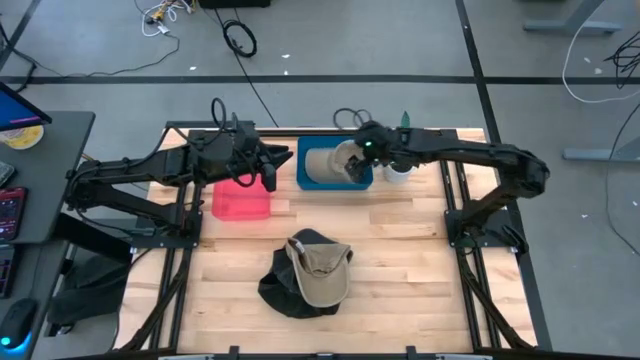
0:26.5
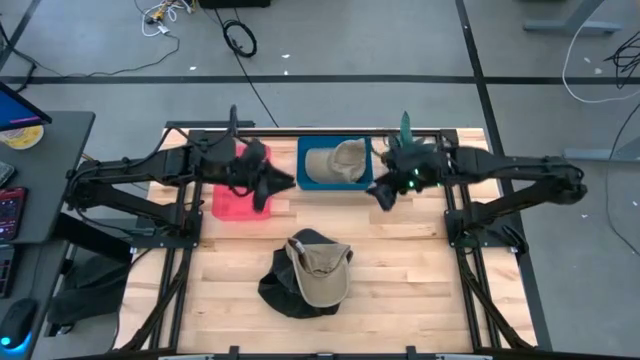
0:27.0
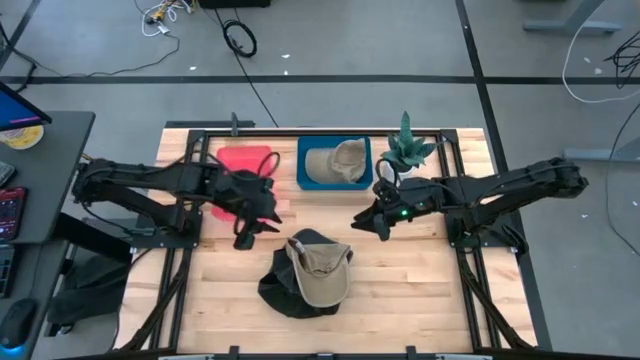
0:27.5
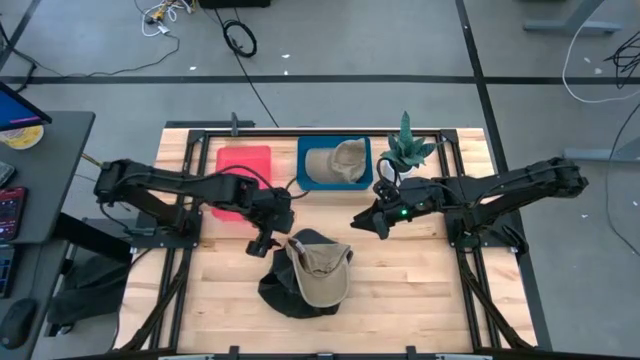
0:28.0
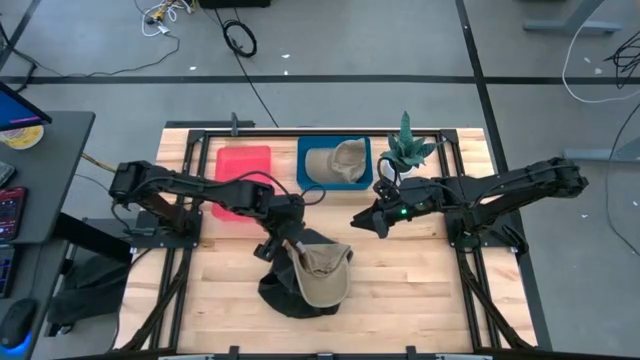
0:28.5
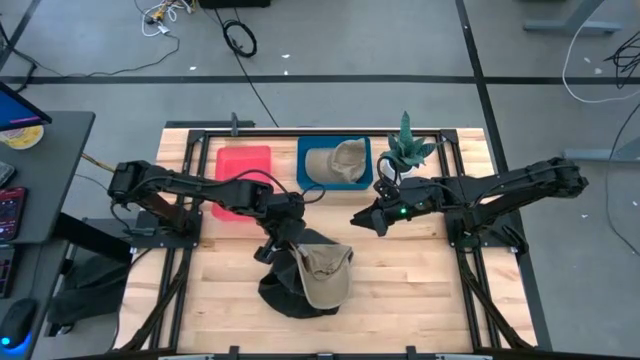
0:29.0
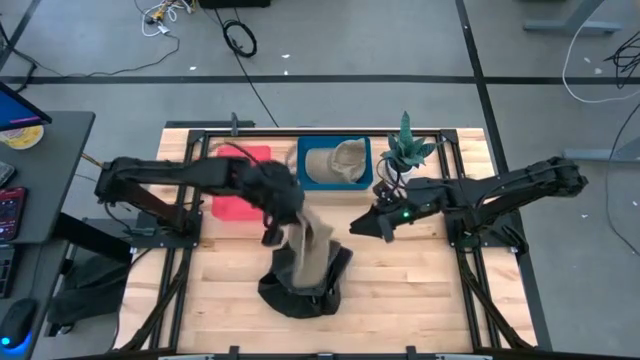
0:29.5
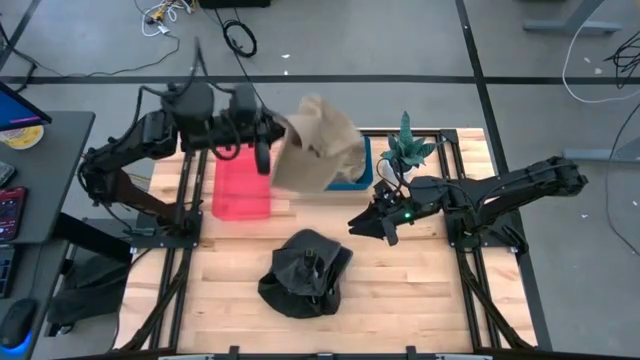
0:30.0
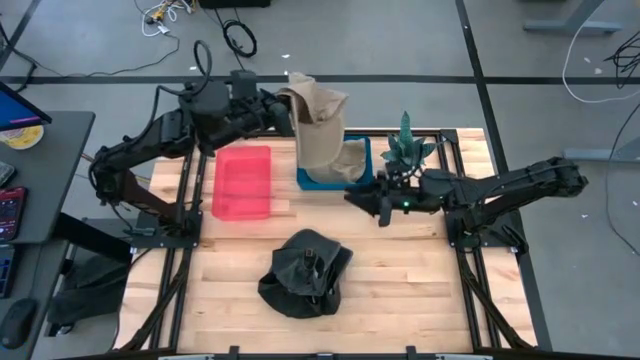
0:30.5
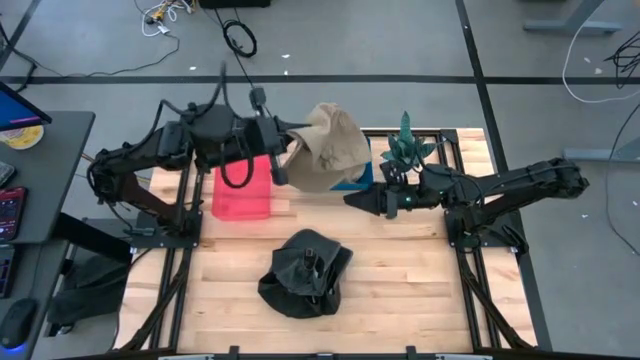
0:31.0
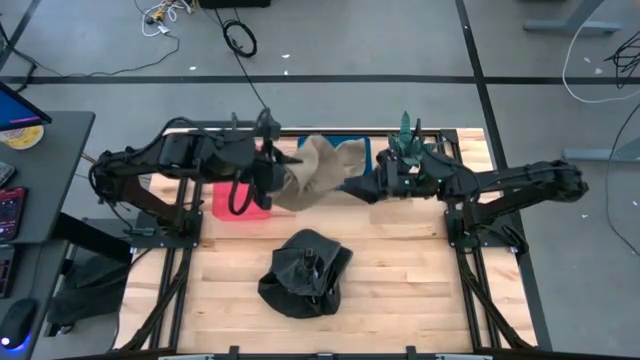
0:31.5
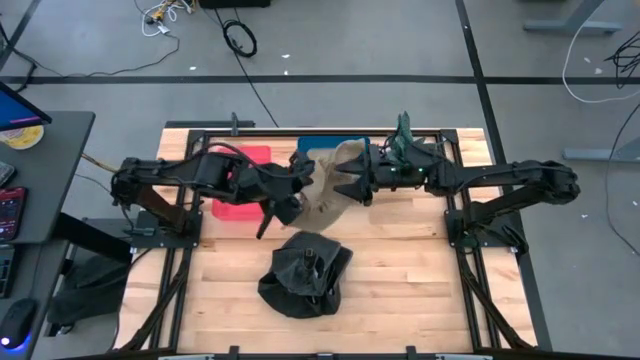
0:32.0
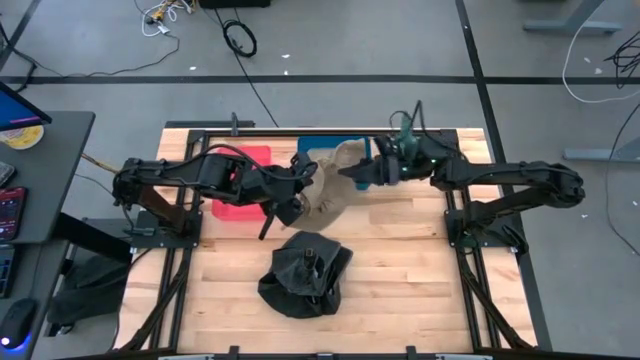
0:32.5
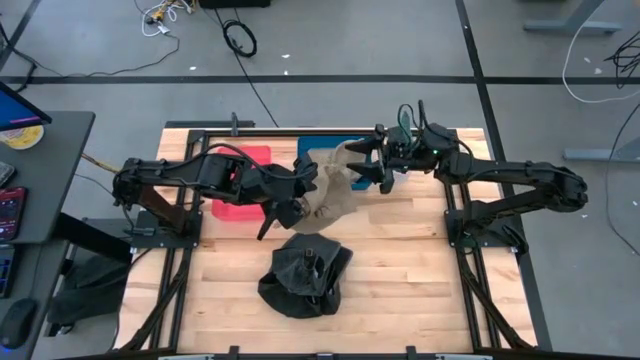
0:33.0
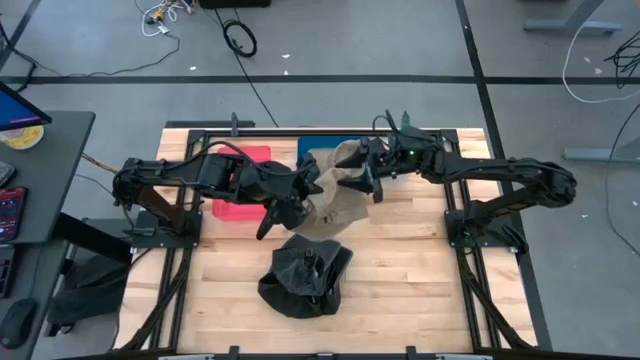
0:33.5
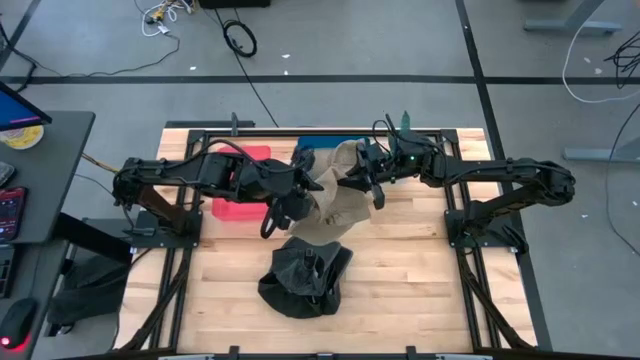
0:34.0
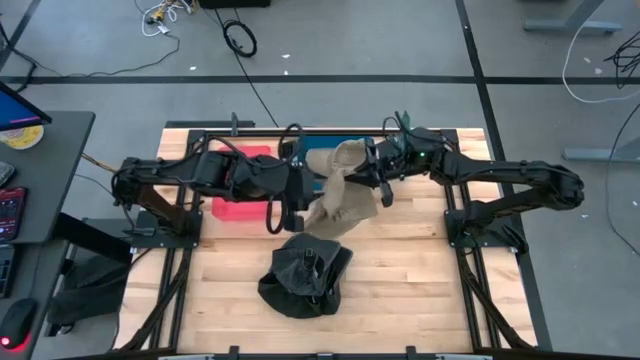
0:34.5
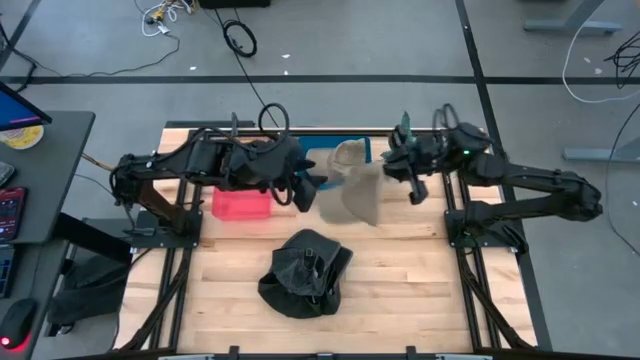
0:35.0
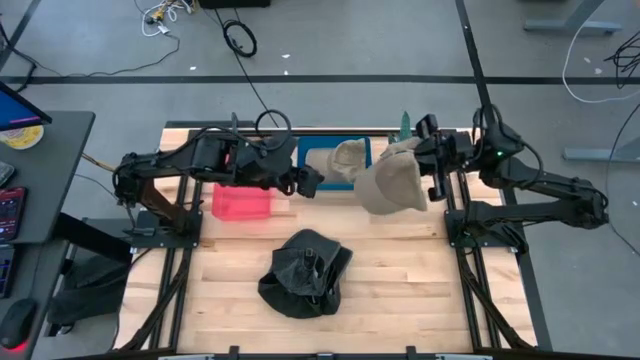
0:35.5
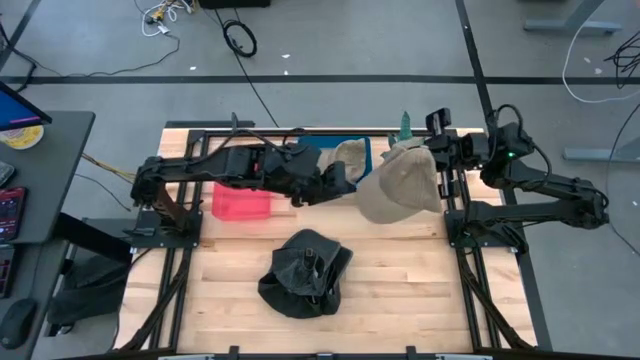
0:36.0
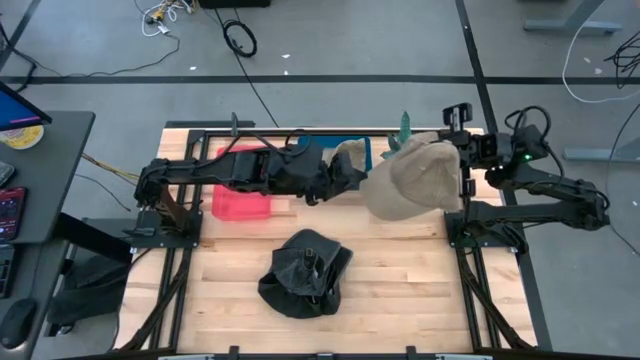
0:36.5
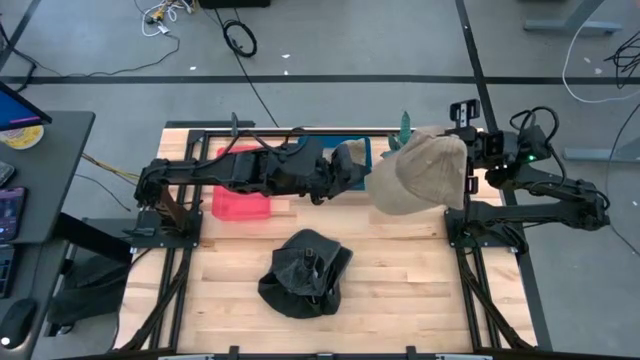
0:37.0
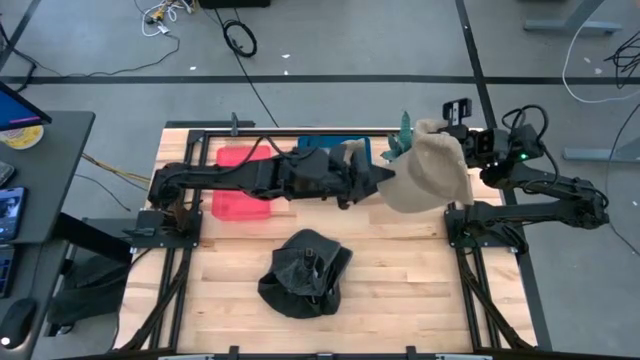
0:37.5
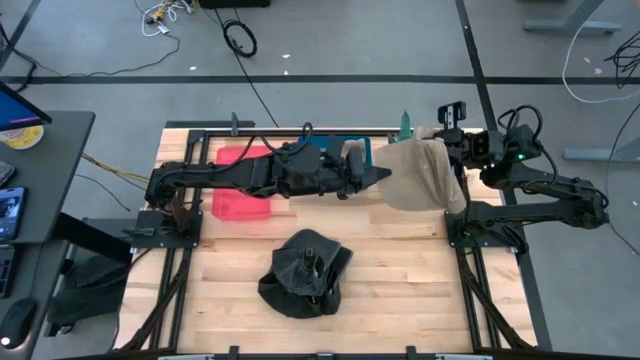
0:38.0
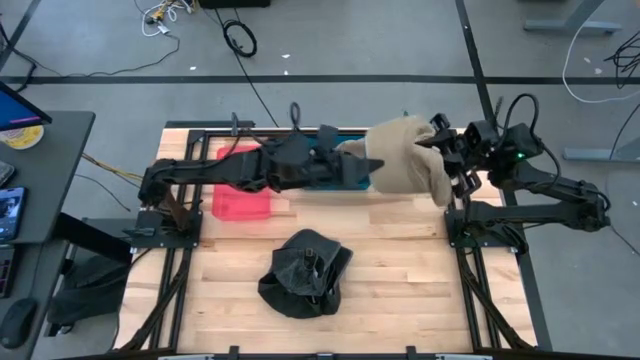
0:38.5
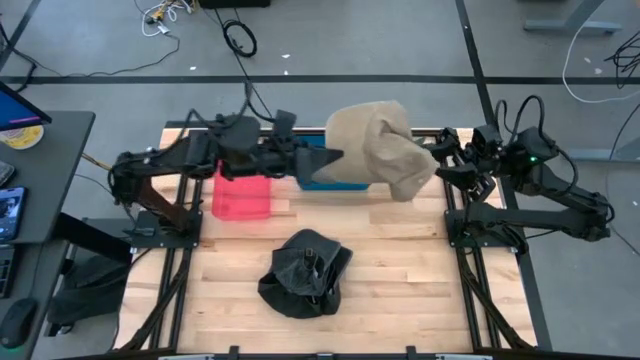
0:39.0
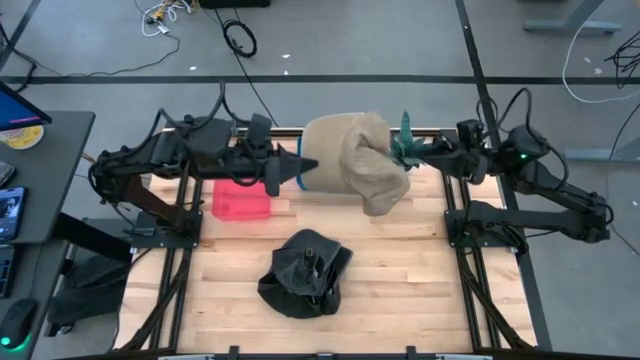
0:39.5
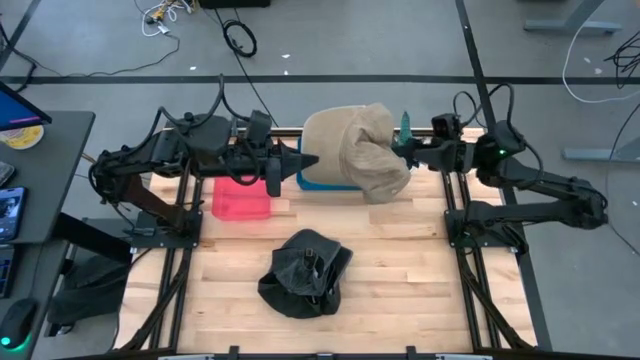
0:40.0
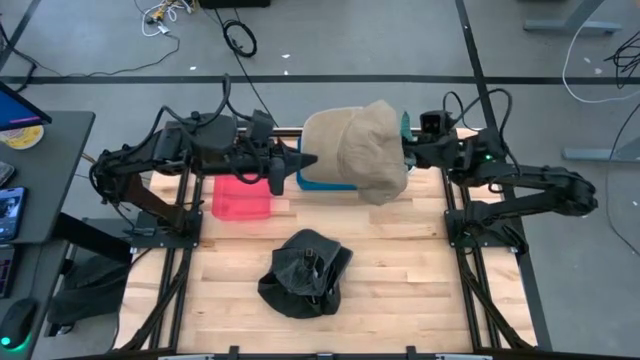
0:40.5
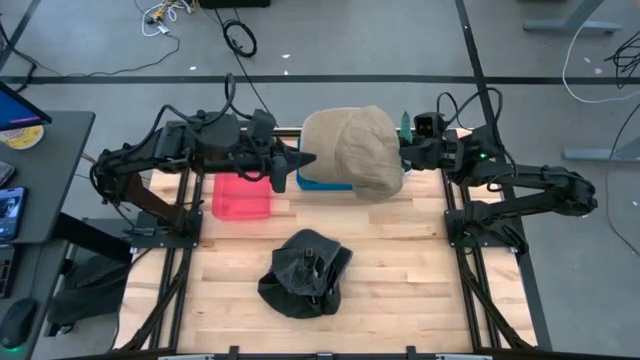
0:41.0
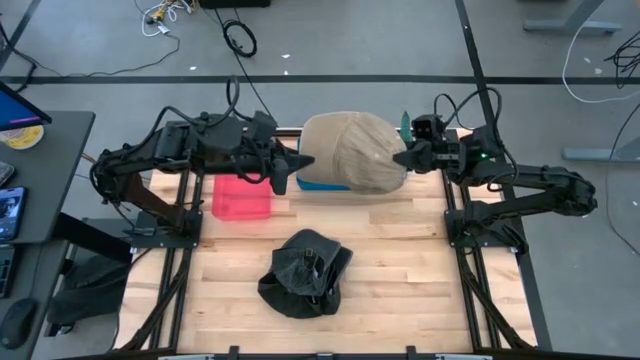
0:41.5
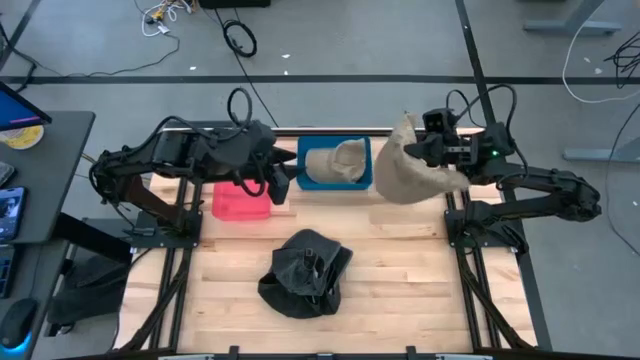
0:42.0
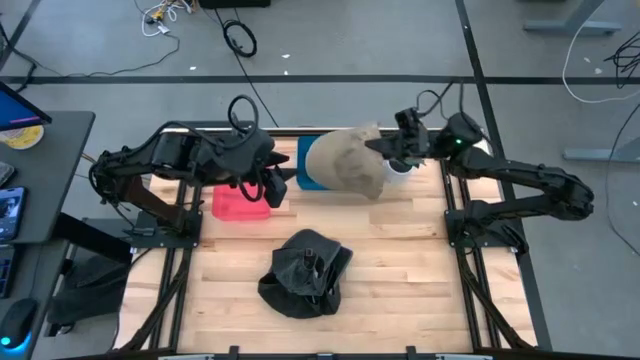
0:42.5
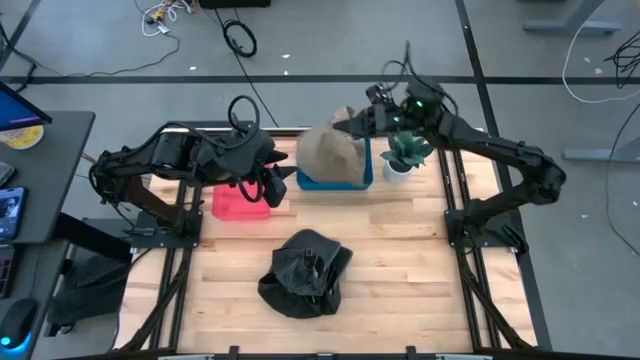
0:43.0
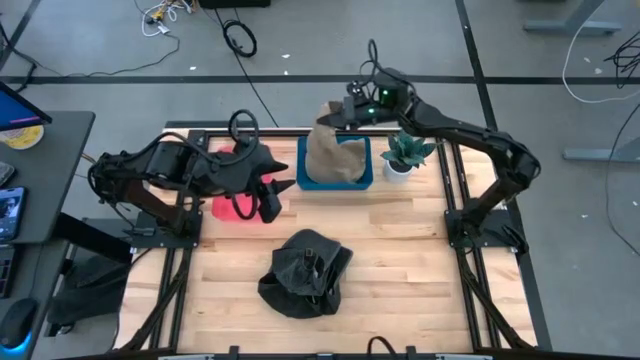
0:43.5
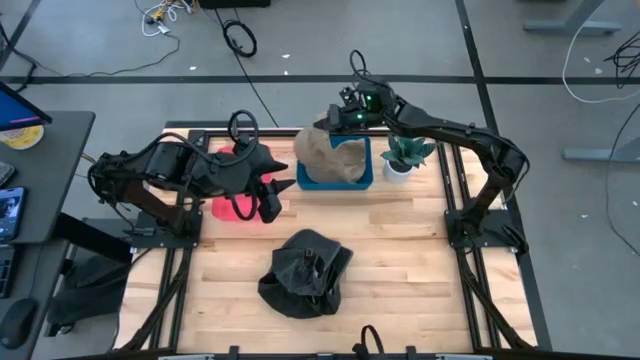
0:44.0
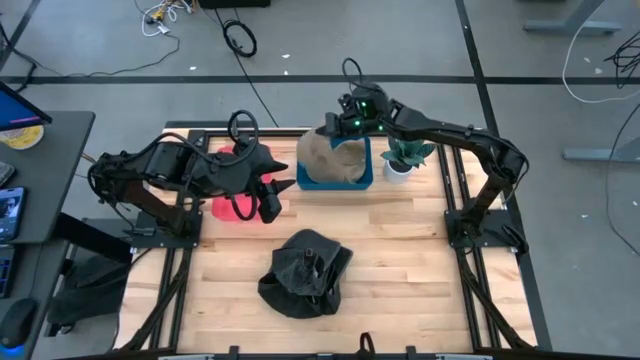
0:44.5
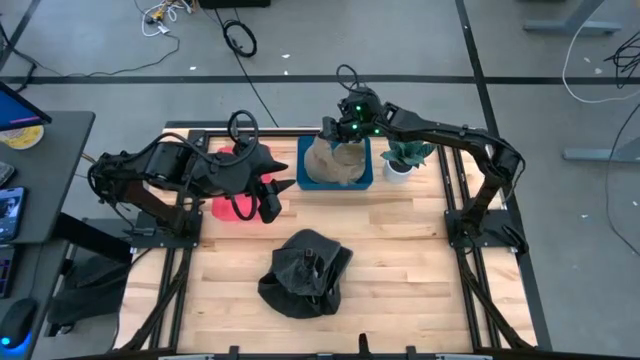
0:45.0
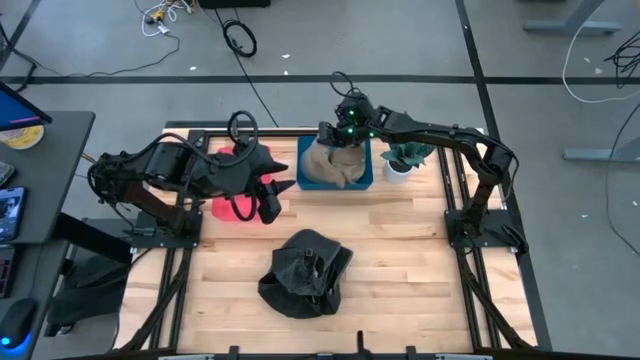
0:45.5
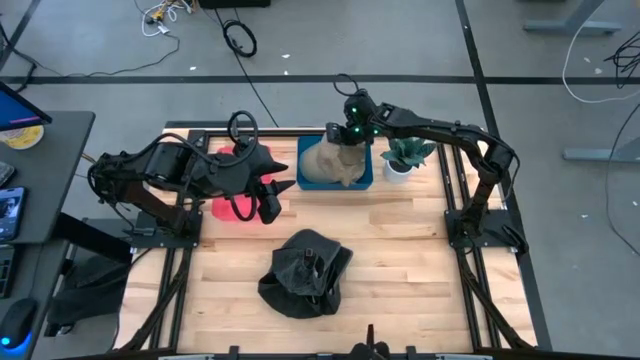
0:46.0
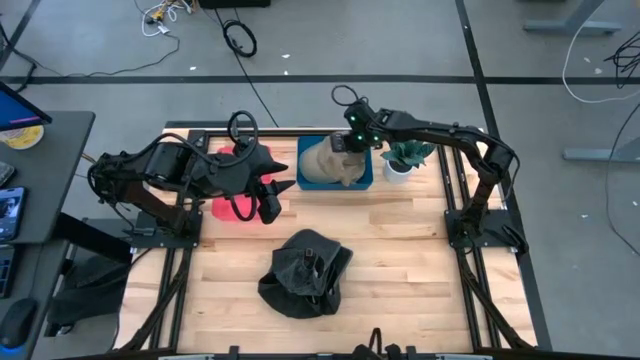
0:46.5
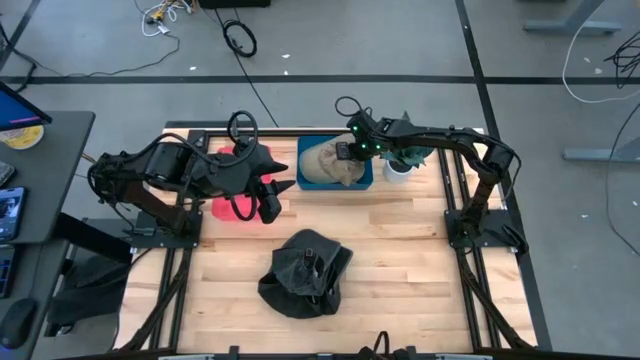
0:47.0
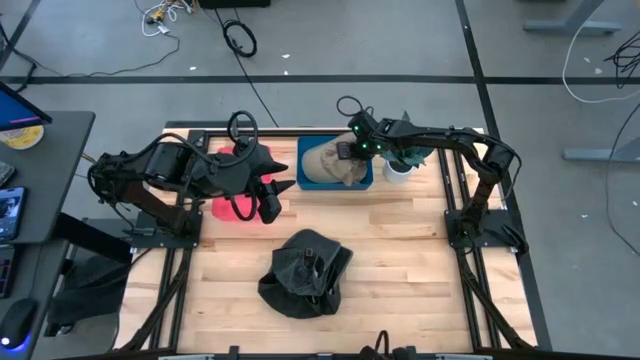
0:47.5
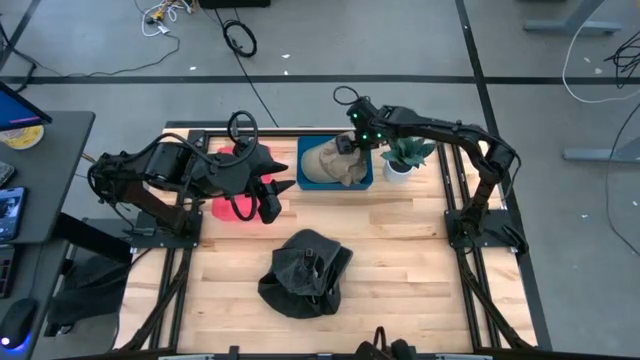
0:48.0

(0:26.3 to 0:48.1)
Task: Pick & Place hat
Put the brown cap into the blue bin

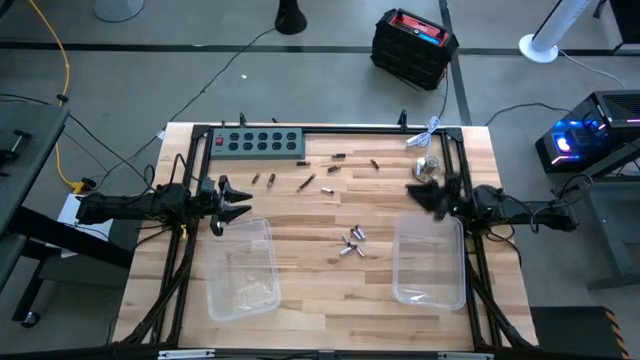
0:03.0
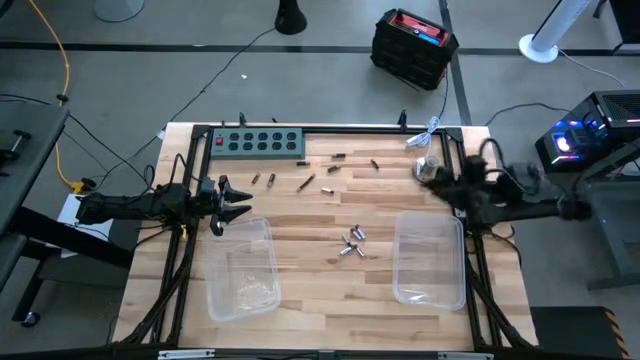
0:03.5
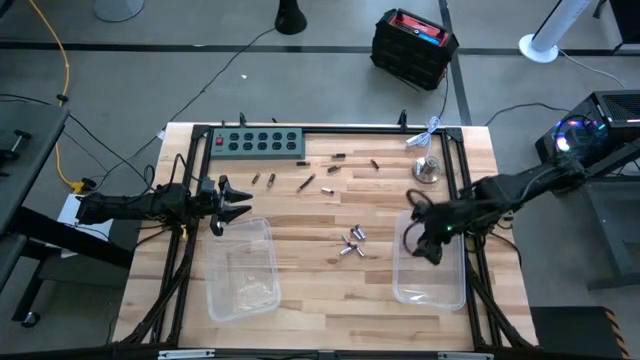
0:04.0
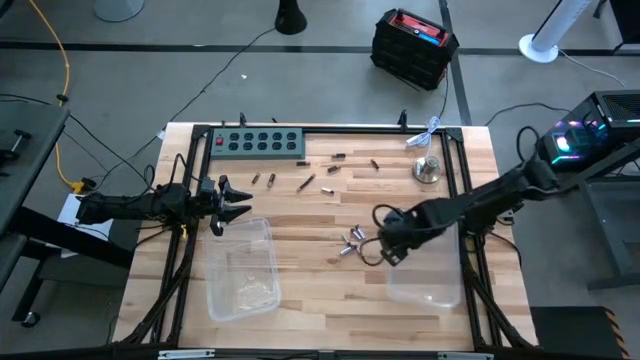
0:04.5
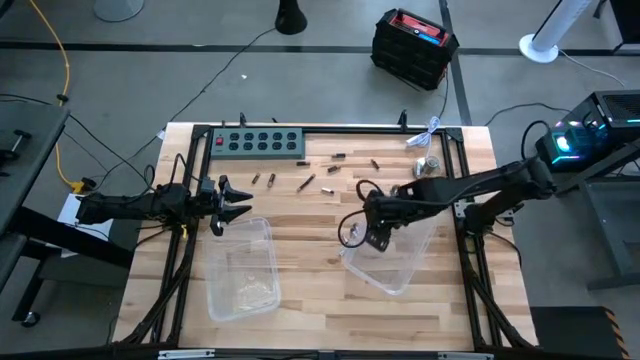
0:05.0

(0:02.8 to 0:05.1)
Task: Sort batteries
Move the right transparent bin to the center of the table
